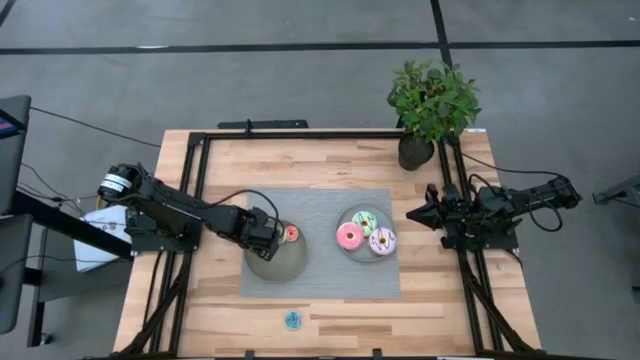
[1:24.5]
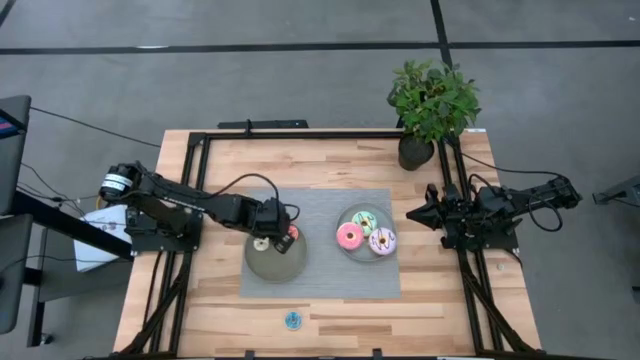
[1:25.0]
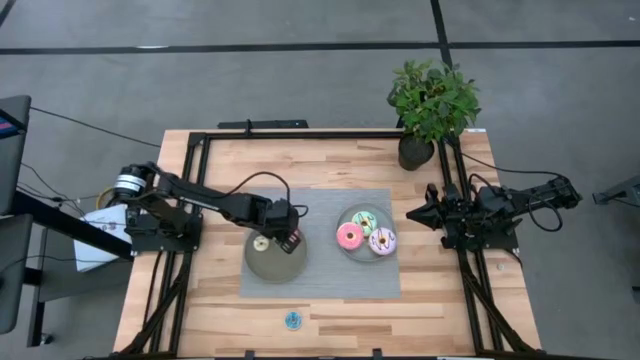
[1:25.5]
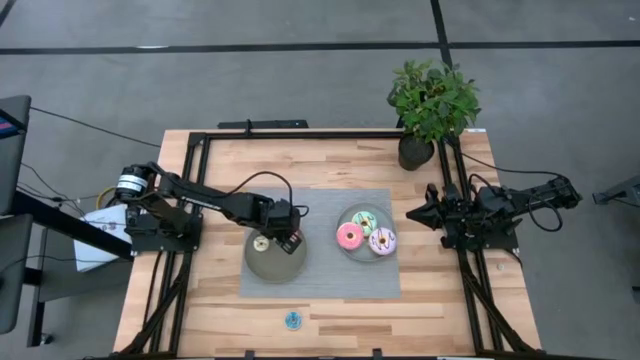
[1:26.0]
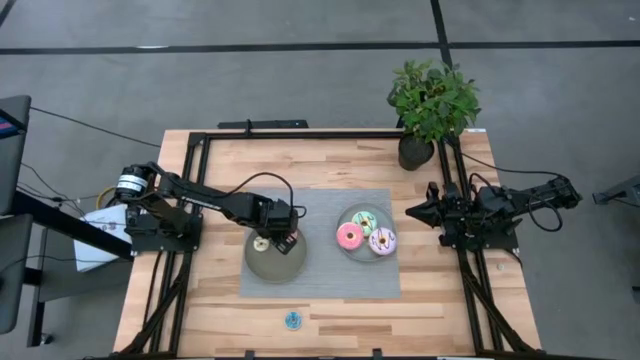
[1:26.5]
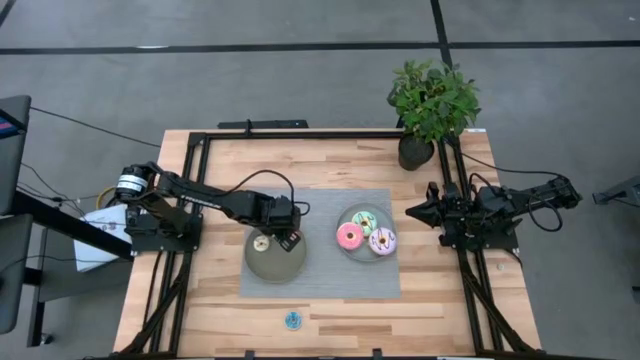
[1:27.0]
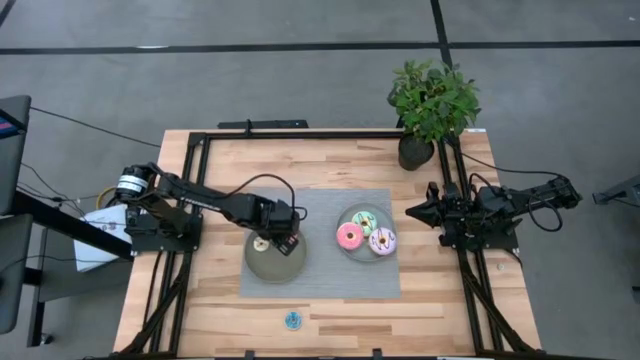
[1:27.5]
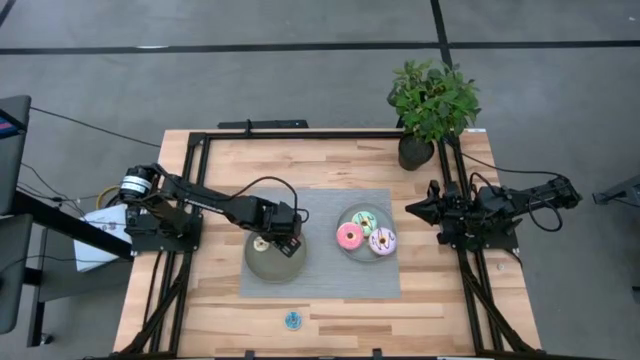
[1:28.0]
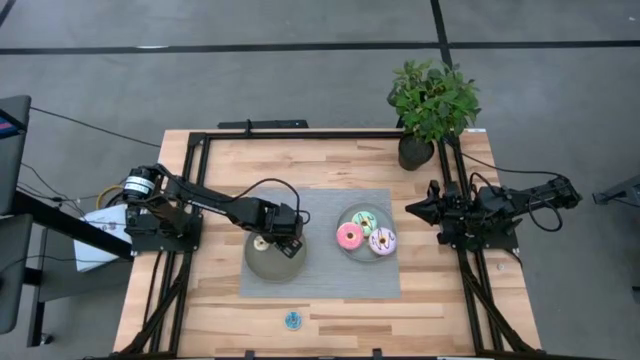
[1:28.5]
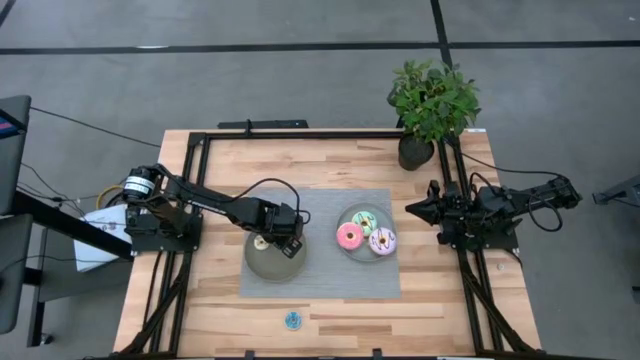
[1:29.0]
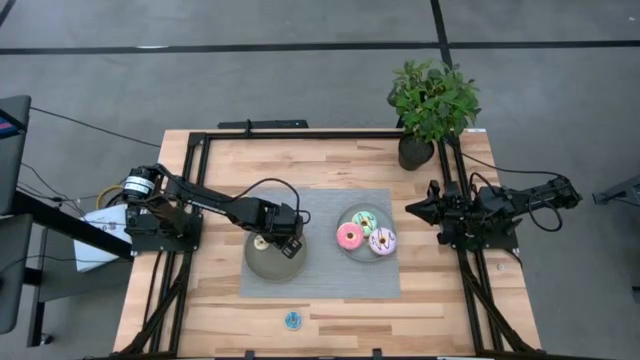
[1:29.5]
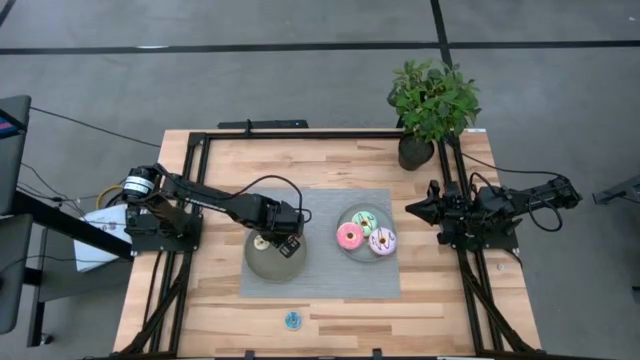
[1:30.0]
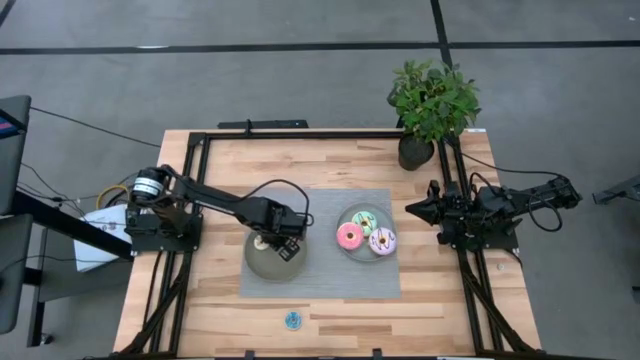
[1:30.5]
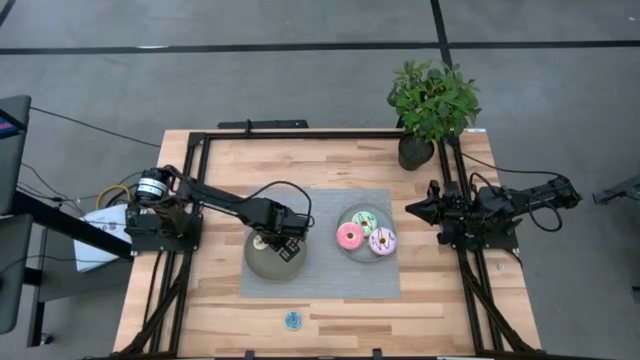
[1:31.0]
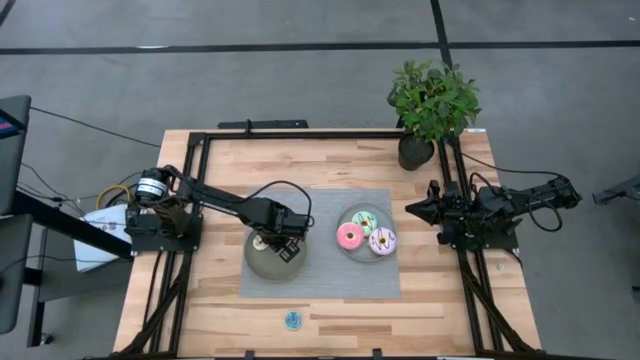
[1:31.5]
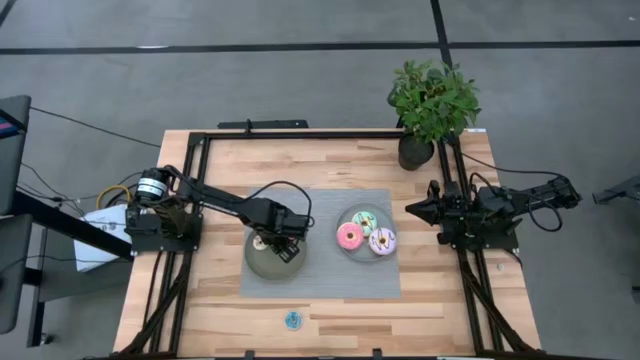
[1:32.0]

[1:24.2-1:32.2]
Task: Pick & Place donuts
Adjust the small green donut on the brown plate

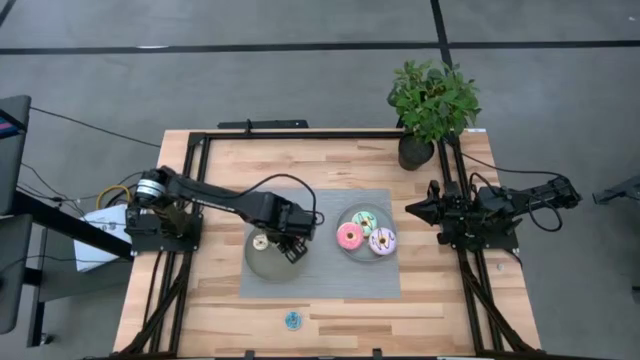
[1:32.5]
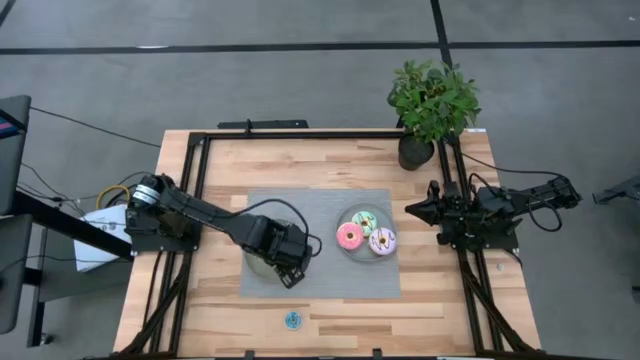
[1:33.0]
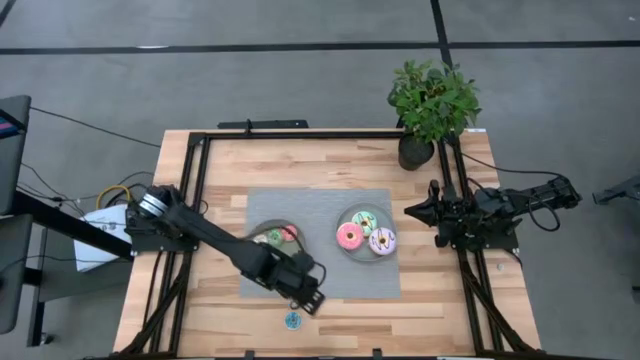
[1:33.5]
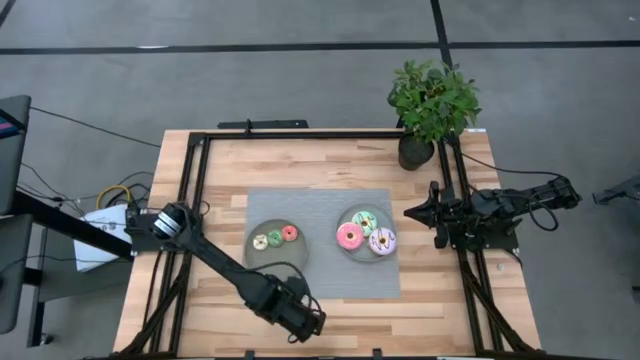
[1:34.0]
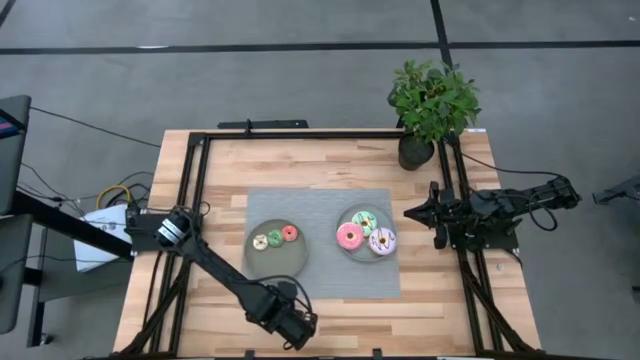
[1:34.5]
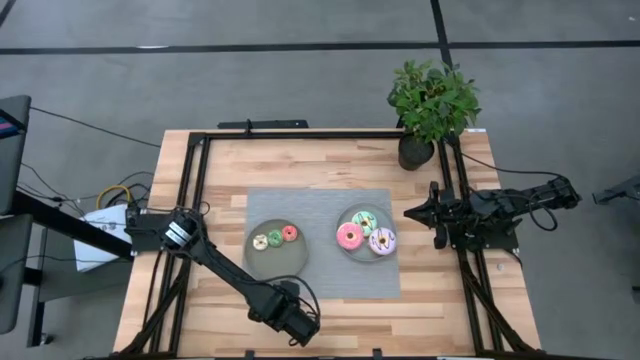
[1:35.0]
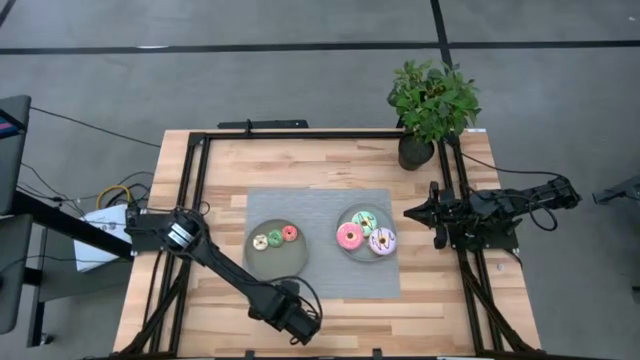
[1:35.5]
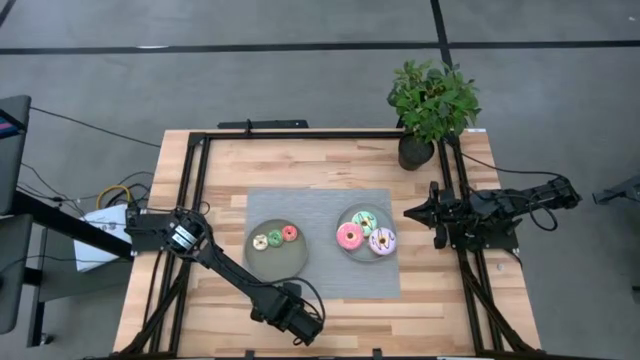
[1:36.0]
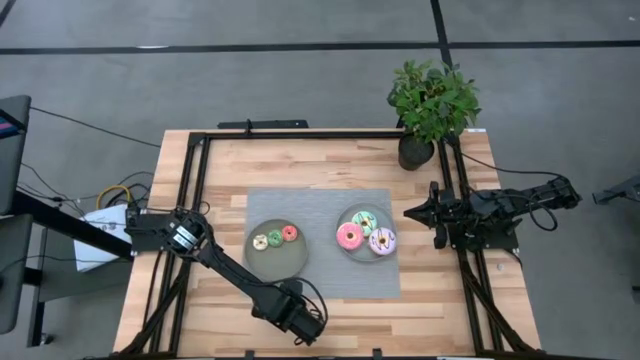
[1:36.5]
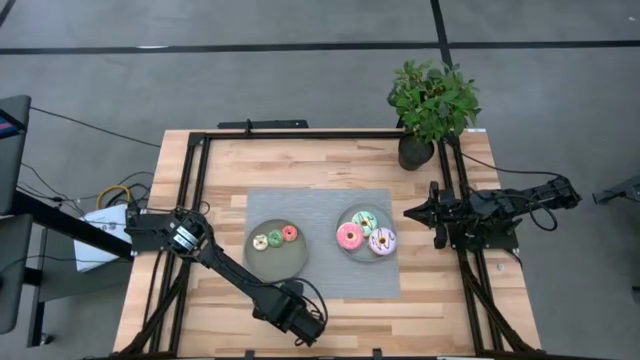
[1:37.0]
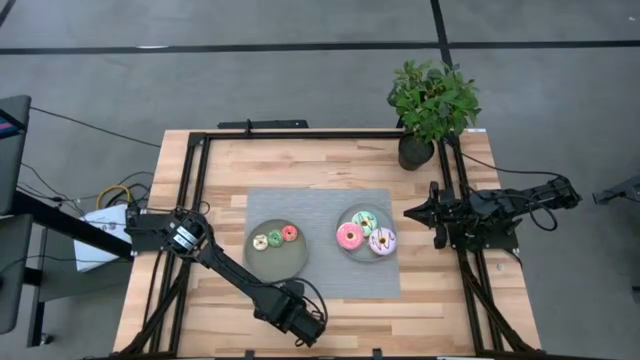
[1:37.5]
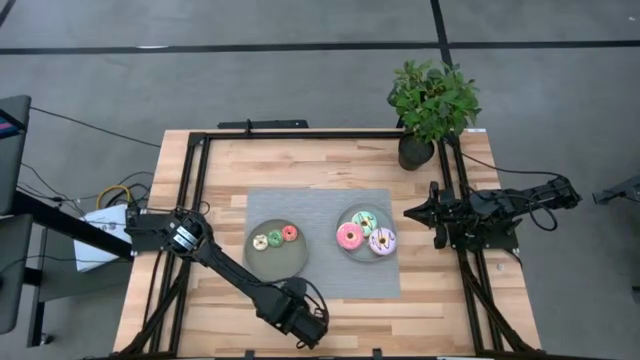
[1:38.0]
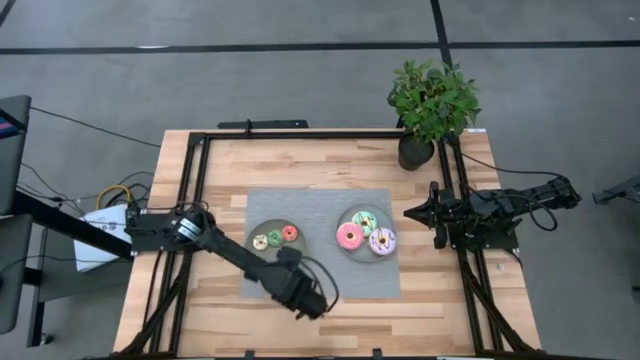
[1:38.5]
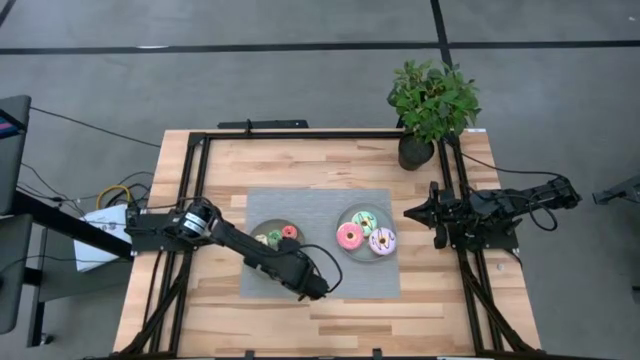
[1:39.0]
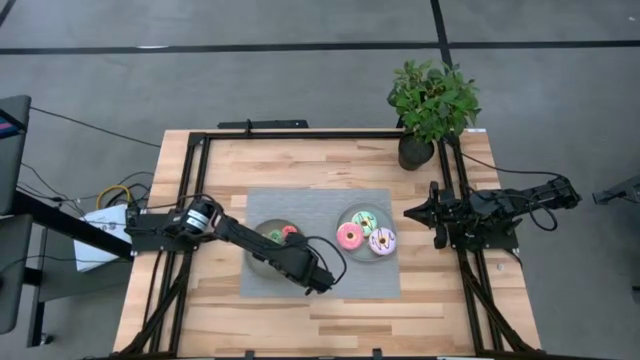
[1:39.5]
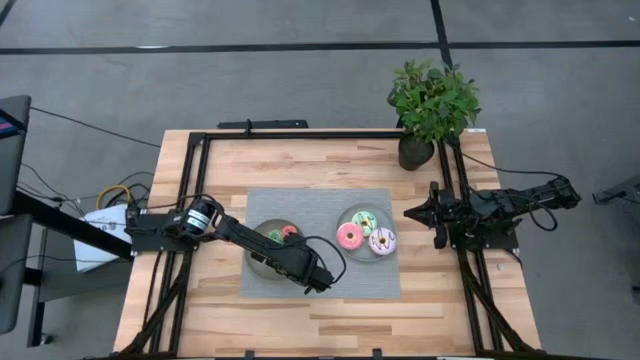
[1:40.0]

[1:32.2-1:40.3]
Put the small blue donut on the brown plate

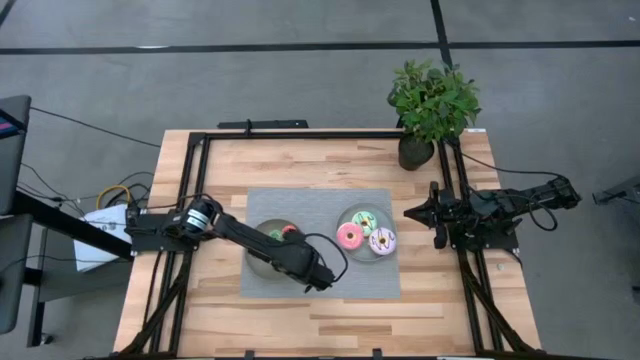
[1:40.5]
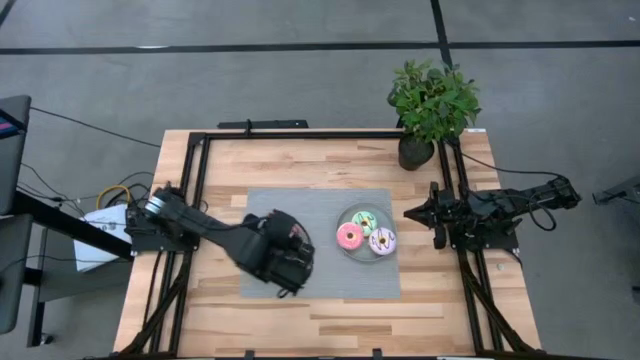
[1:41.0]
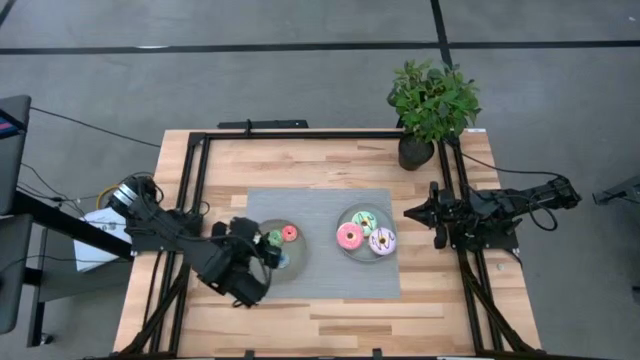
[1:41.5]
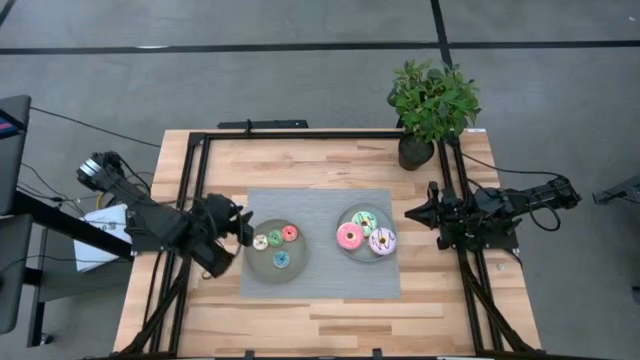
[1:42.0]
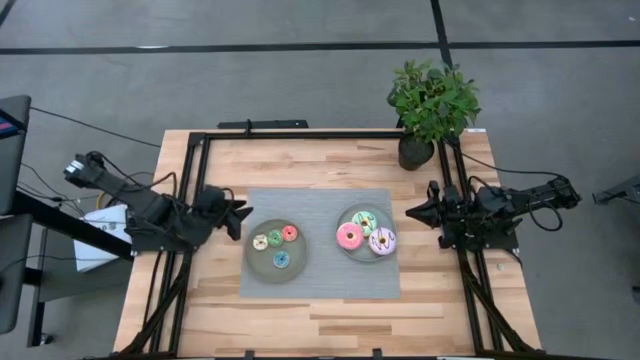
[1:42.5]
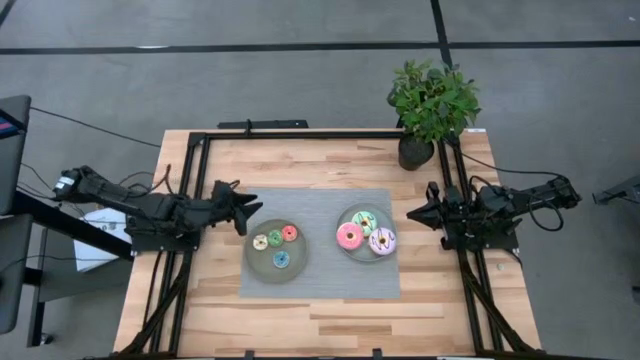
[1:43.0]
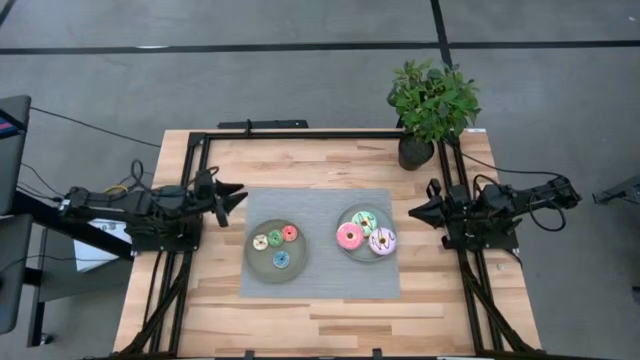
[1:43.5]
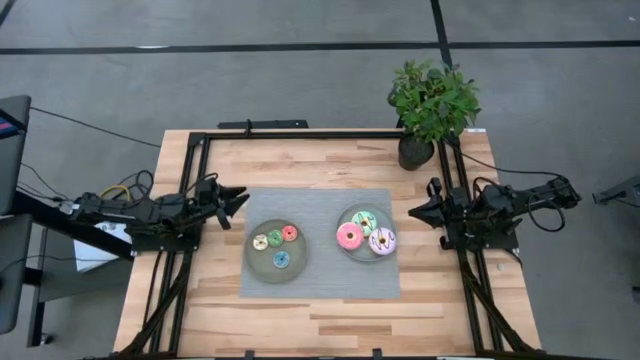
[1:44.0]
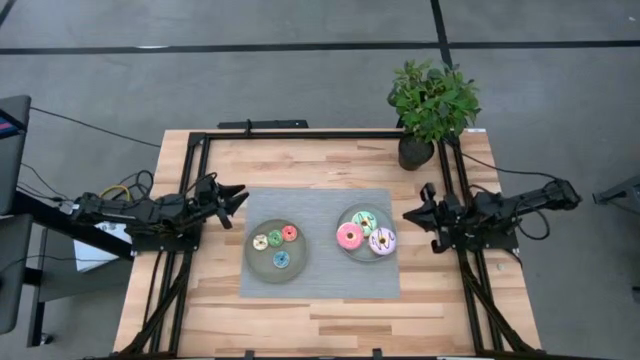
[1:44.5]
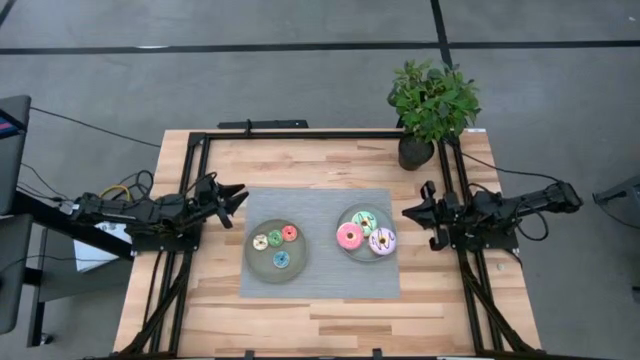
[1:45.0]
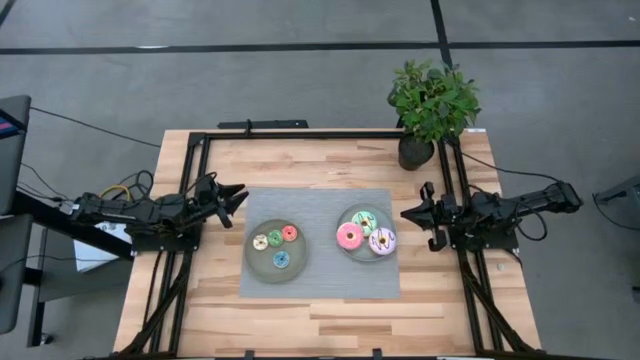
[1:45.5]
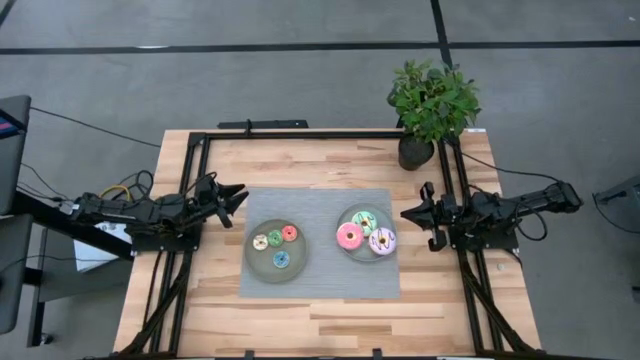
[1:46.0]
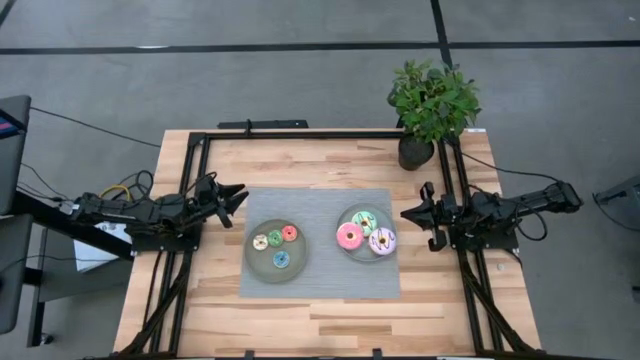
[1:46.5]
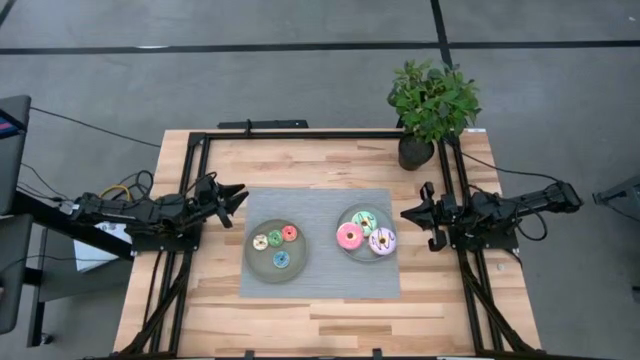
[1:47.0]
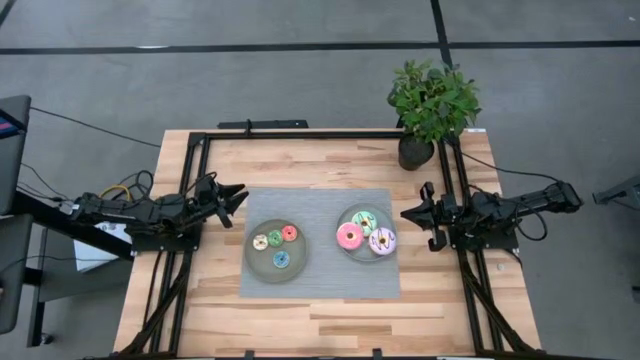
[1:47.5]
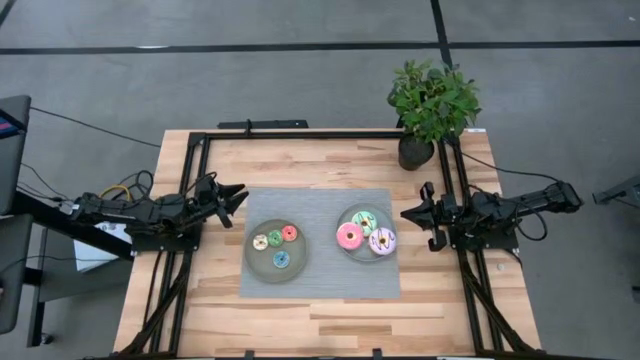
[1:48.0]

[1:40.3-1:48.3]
Return to Home Position
